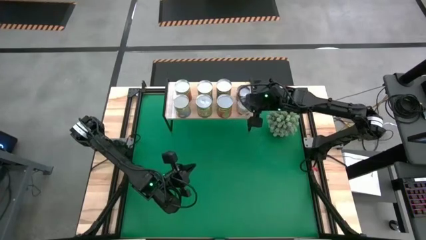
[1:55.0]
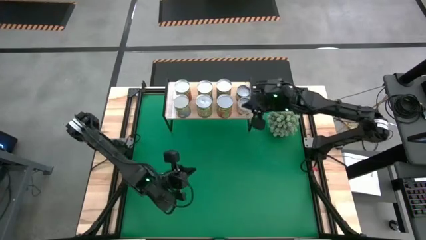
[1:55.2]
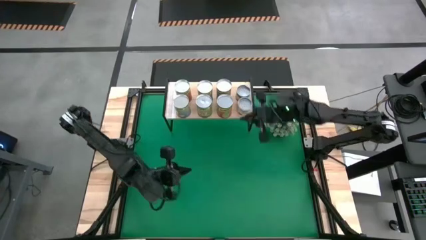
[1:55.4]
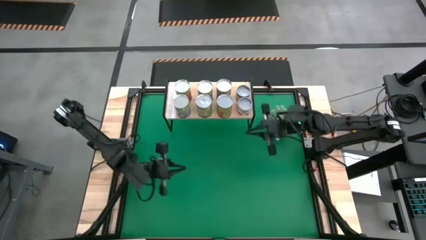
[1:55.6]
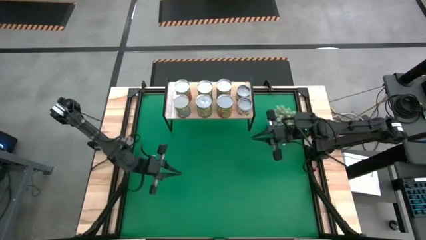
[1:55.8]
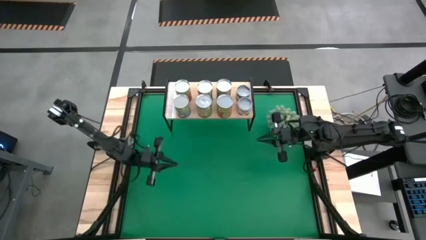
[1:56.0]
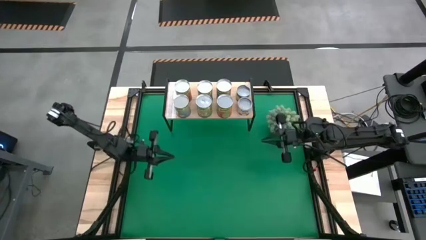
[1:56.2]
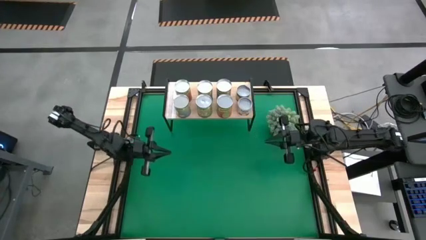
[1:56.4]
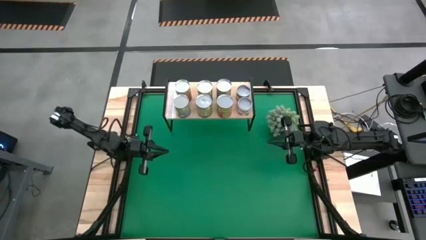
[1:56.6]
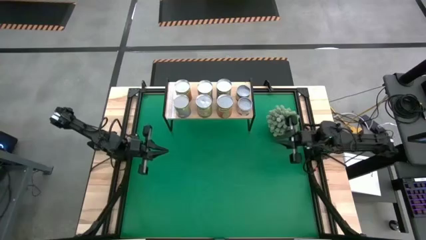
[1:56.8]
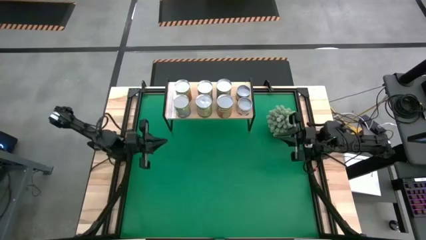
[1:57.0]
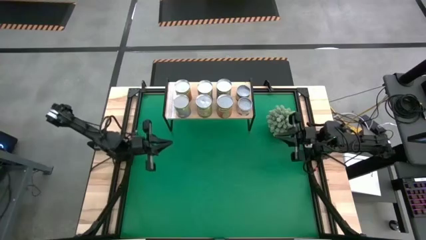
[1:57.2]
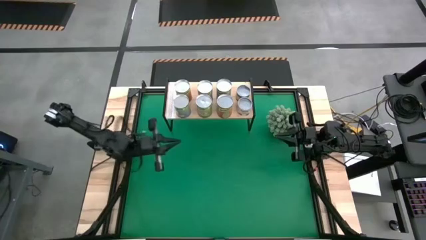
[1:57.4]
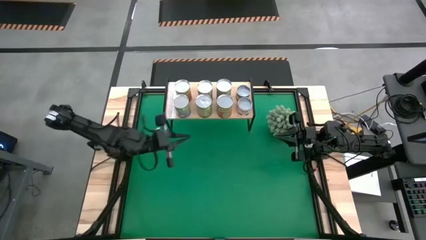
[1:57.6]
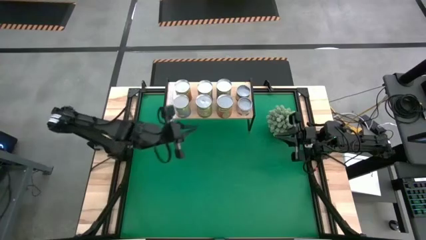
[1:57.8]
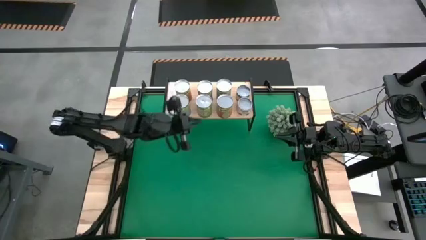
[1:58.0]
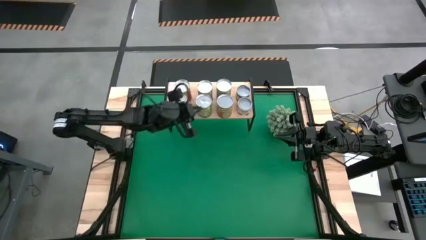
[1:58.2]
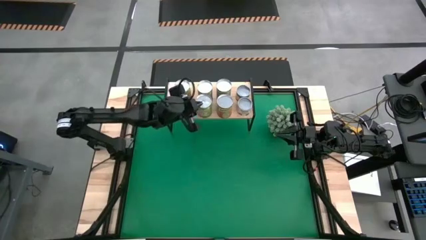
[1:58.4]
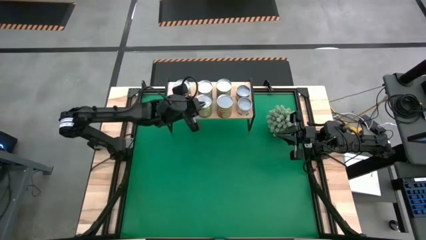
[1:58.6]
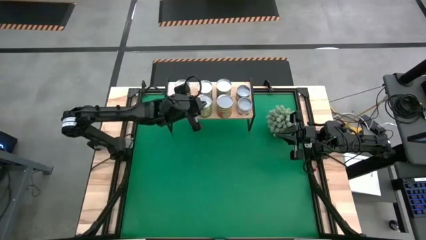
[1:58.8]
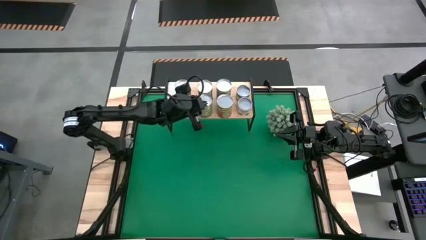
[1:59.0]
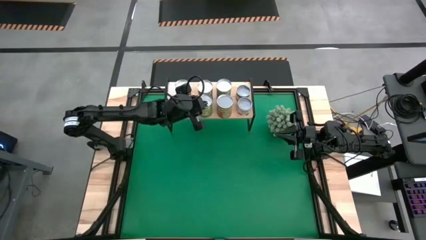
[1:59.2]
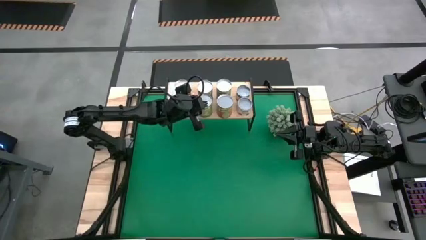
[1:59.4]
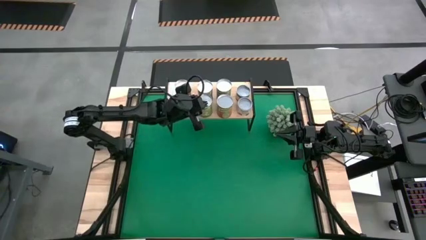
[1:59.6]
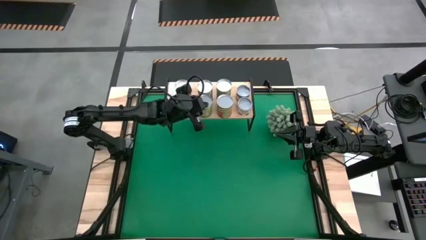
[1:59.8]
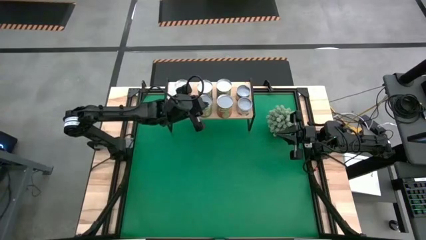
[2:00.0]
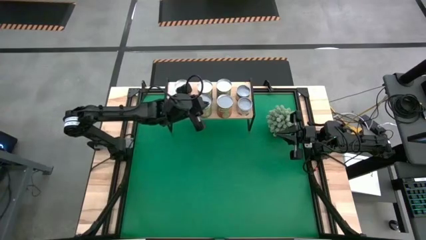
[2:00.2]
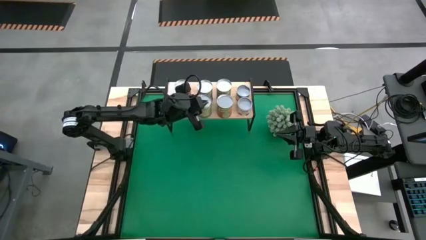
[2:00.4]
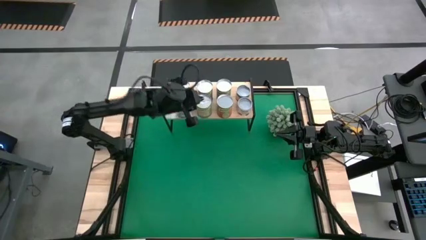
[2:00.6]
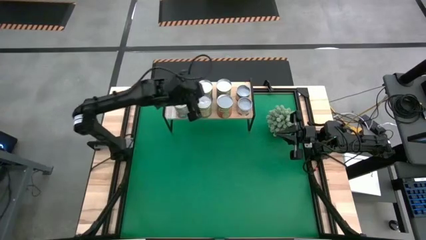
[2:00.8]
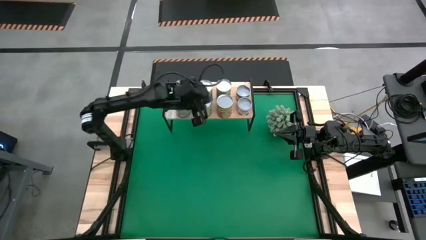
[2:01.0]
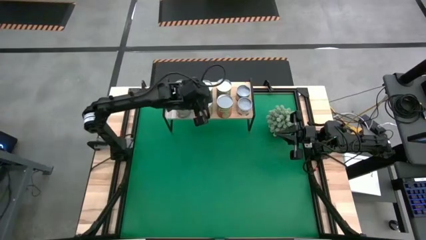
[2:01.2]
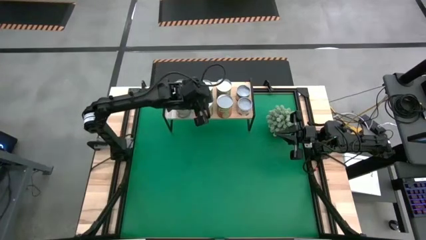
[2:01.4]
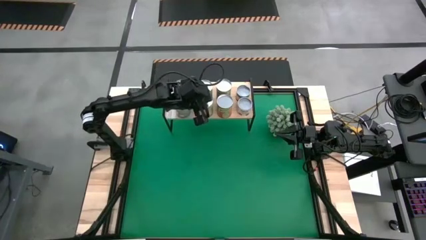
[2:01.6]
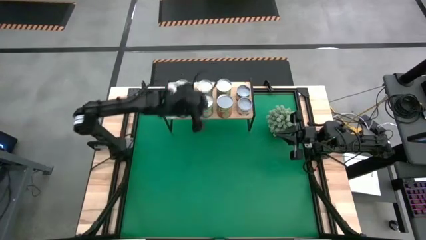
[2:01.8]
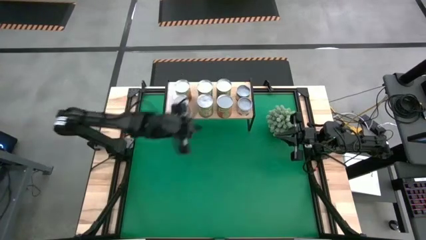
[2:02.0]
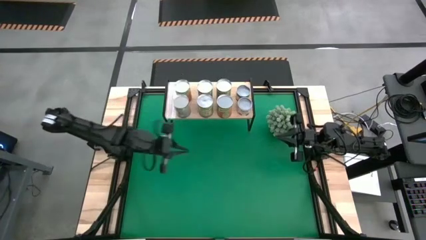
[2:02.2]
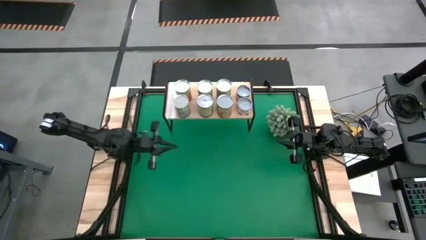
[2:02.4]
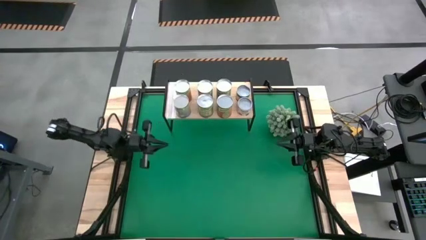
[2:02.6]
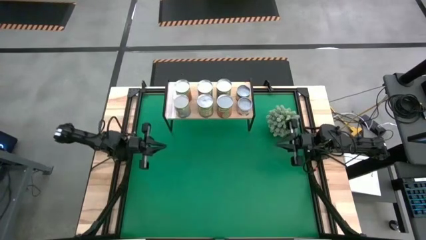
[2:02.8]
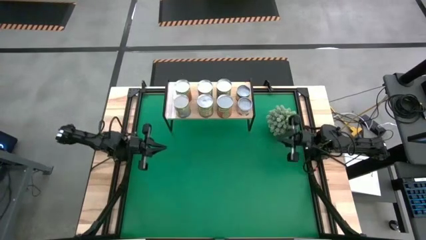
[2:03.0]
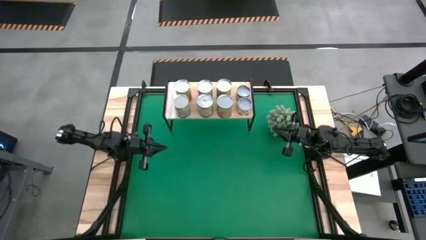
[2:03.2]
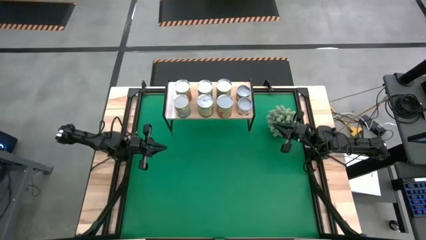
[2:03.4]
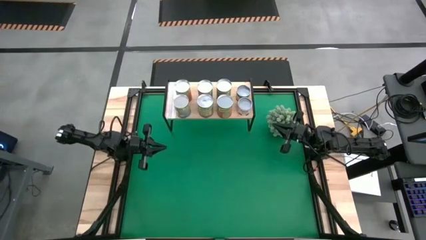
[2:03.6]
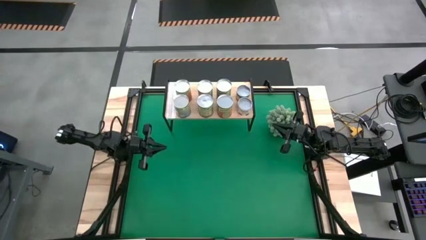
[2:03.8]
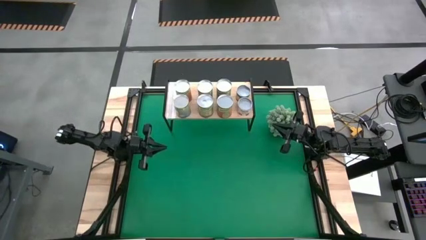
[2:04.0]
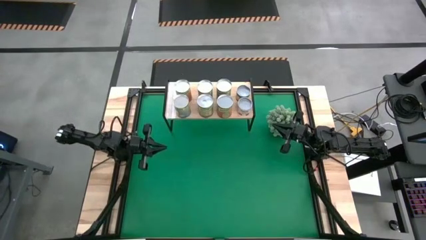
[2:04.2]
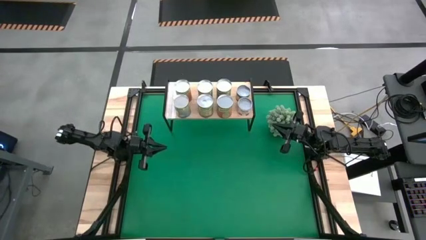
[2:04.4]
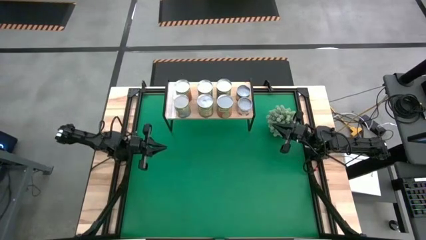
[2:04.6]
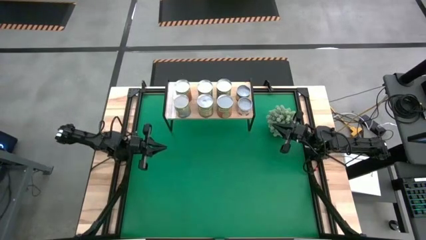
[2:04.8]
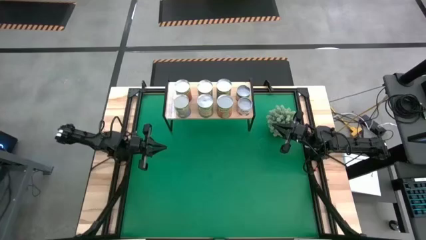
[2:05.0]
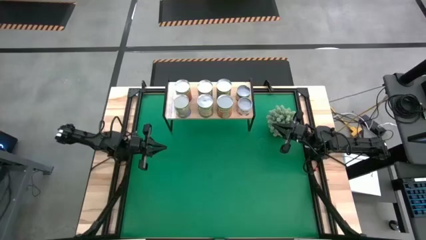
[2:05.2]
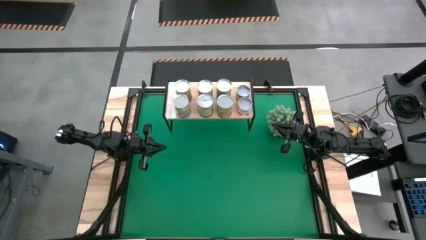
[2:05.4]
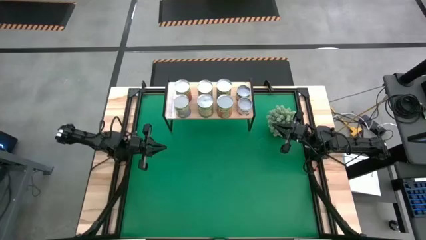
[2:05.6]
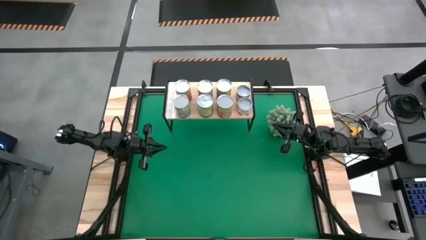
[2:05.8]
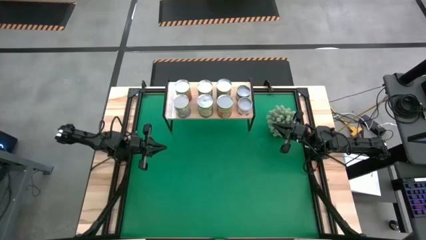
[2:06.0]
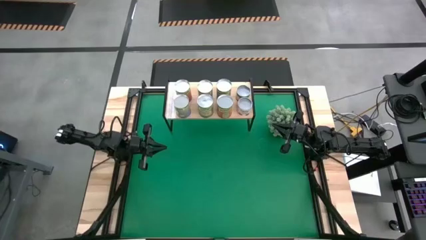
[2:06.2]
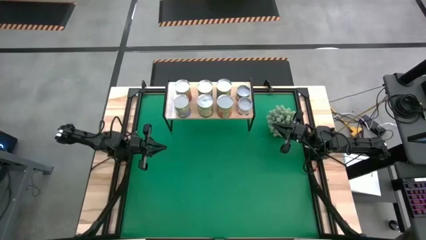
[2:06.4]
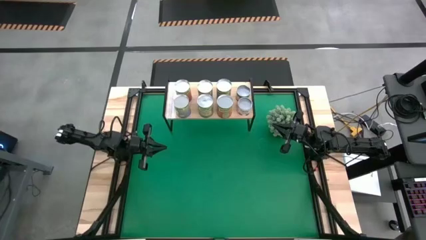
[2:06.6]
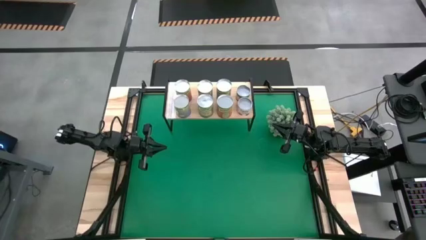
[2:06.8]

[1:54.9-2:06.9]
Task: Pick and place cans onto a shelf
Return to Home Position

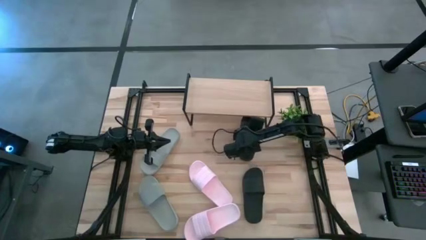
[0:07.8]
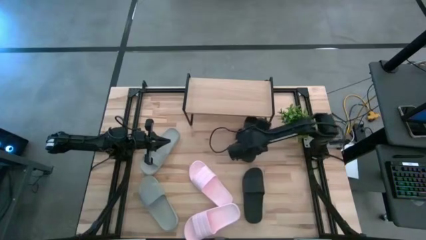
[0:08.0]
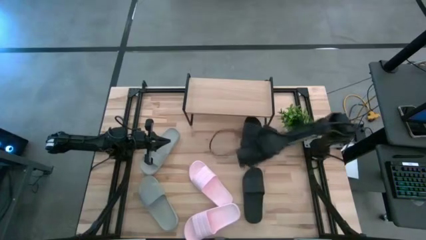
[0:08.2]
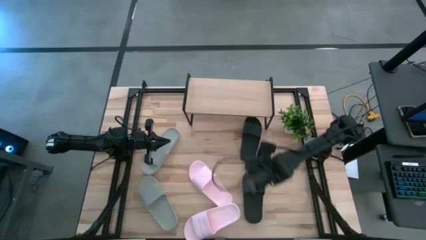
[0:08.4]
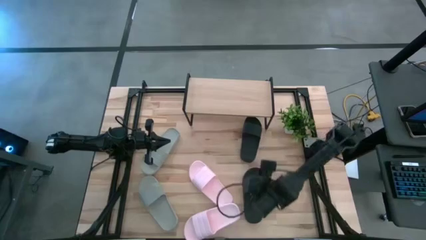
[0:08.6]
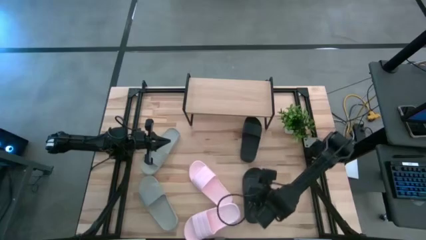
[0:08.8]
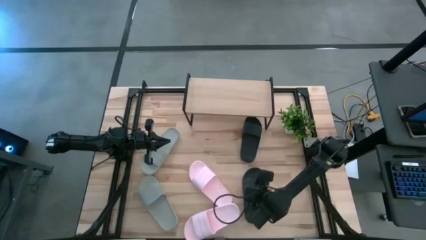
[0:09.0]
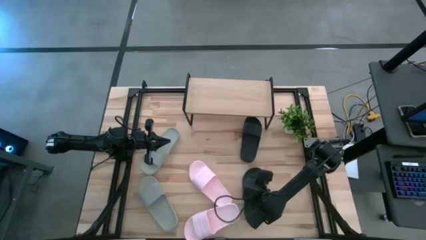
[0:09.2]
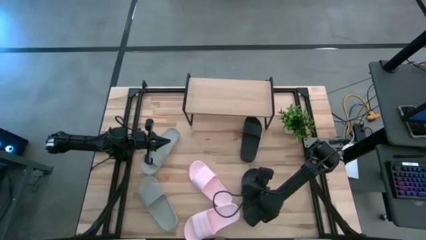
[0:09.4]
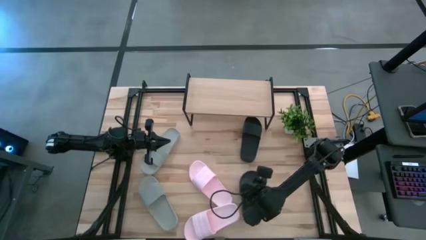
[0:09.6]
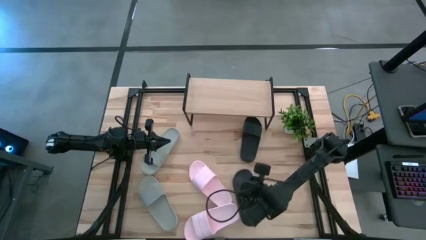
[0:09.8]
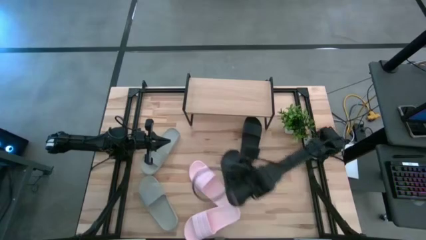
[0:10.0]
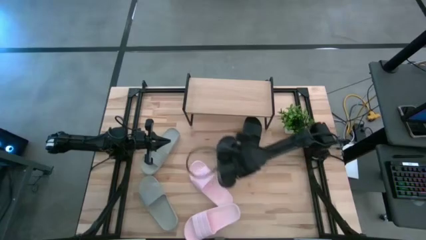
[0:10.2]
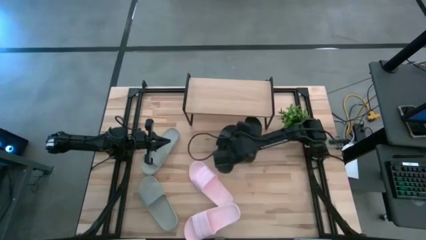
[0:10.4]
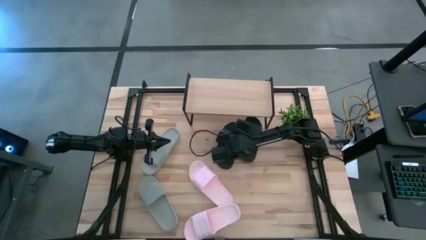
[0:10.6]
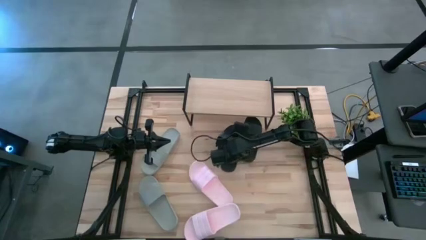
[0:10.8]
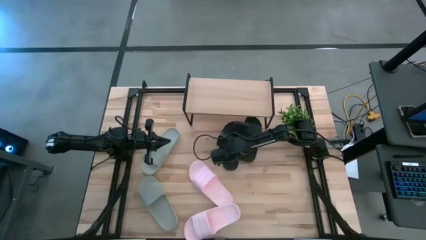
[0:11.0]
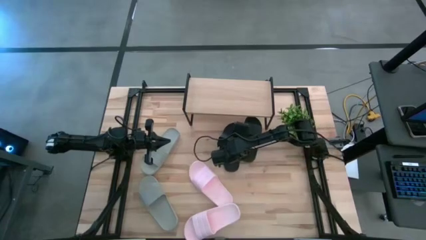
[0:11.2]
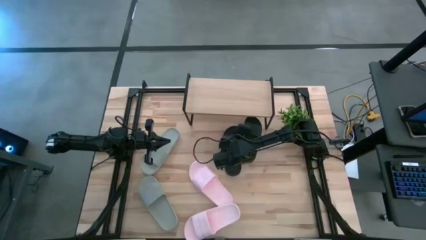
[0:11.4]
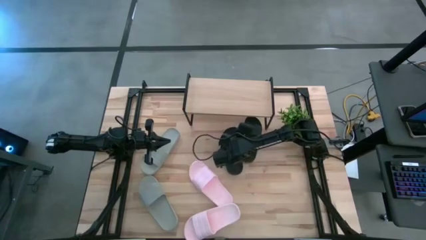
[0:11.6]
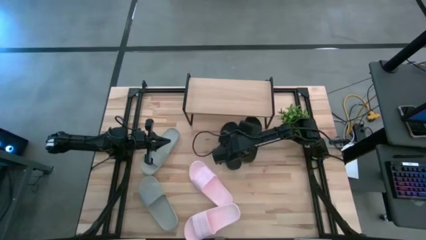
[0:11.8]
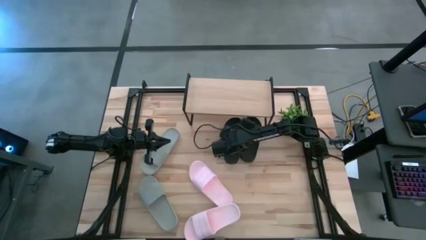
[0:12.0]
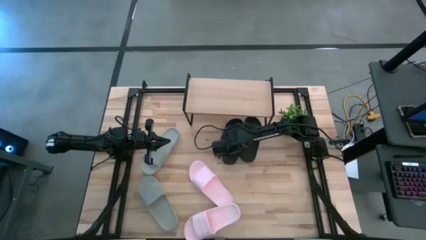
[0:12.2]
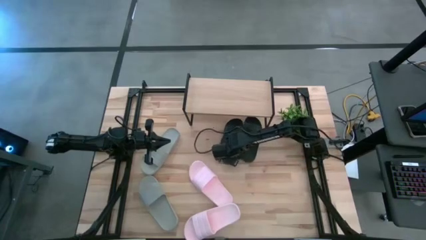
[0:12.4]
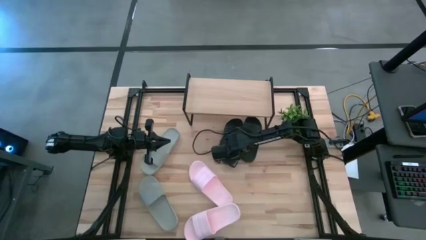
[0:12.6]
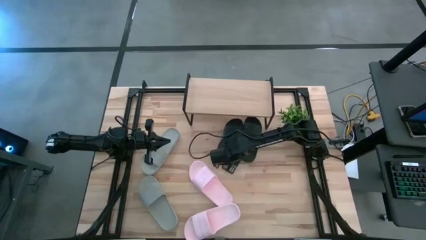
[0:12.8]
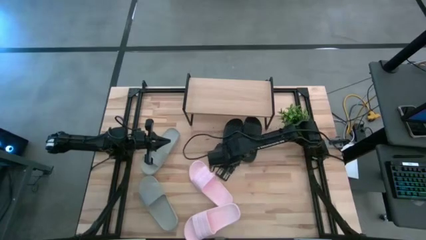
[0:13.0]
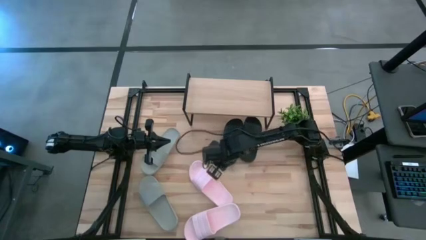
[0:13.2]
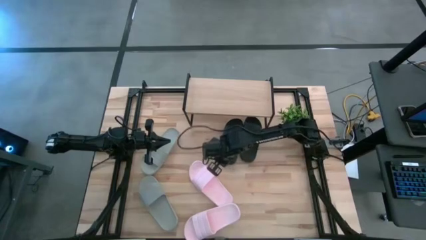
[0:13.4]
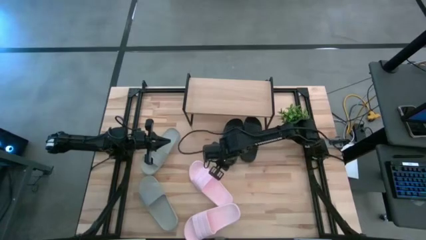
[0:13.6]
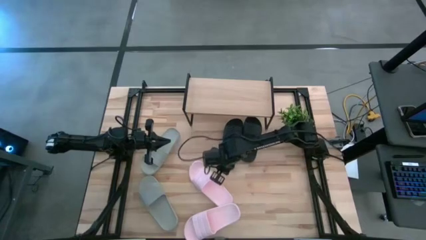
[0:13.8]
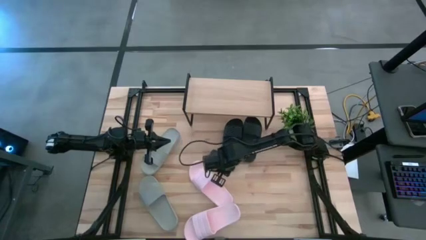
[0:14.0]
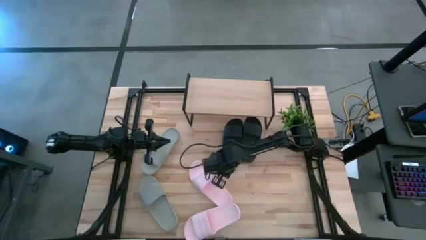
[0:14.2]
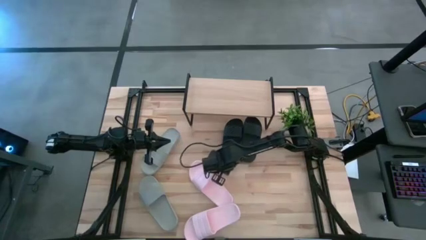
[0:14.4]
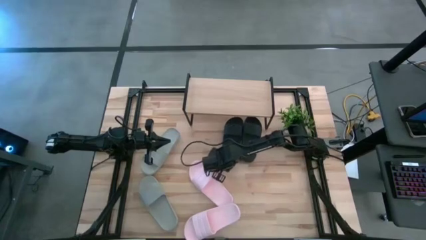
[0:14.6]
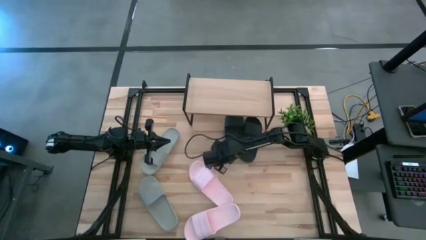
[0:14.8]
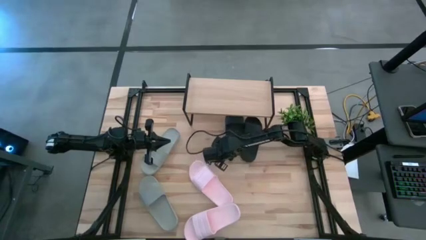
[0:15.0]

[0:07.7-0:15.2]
Task: Pick and place slides into the shelf
Put the left black slide under the shelf
